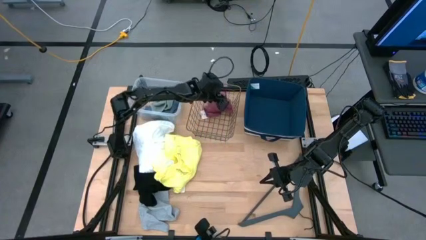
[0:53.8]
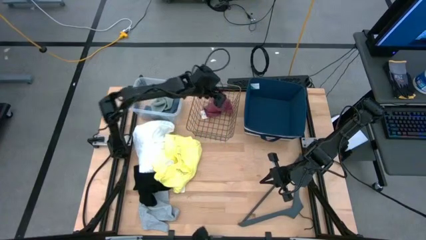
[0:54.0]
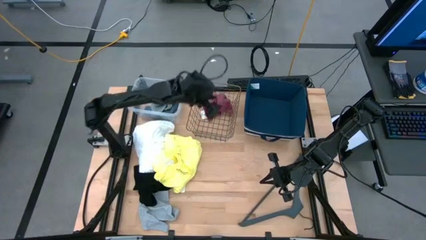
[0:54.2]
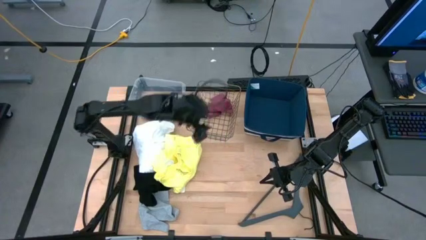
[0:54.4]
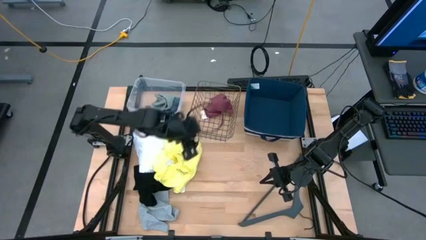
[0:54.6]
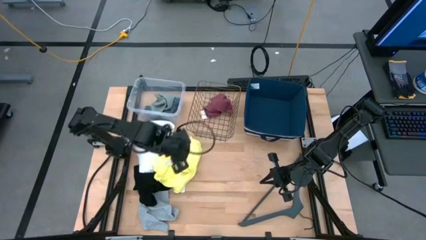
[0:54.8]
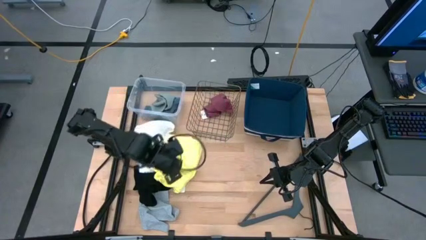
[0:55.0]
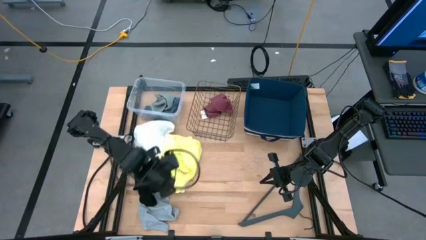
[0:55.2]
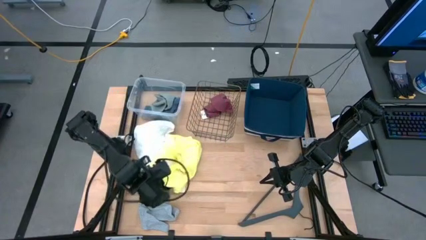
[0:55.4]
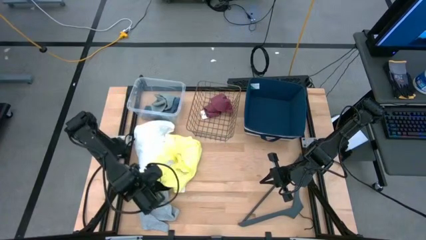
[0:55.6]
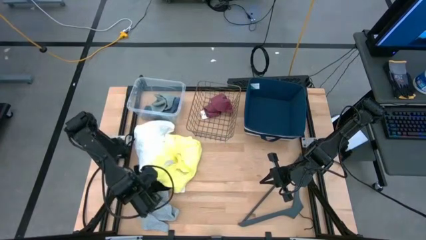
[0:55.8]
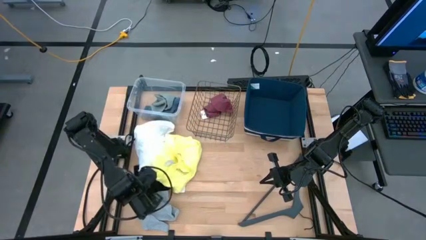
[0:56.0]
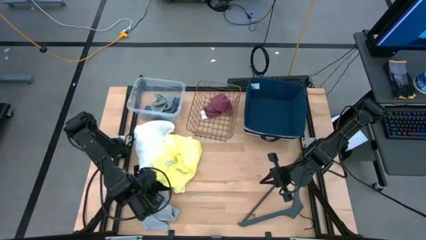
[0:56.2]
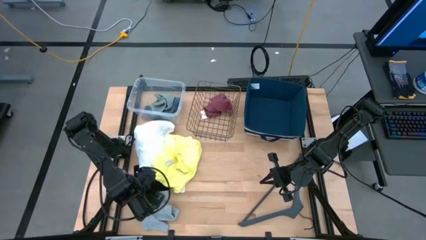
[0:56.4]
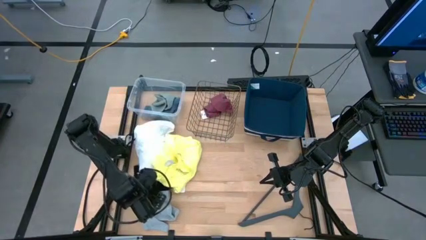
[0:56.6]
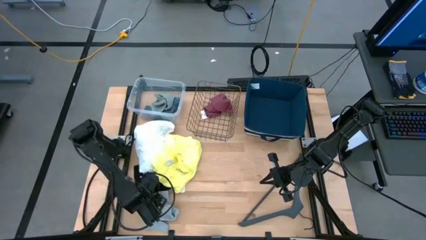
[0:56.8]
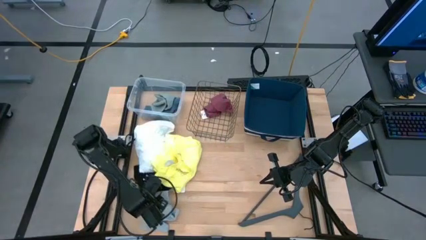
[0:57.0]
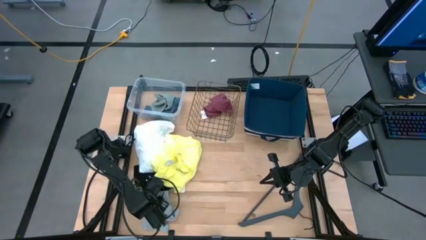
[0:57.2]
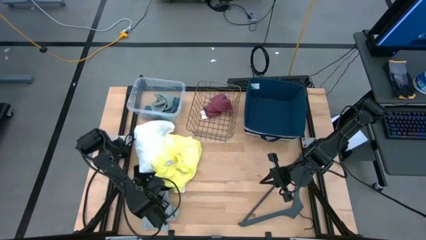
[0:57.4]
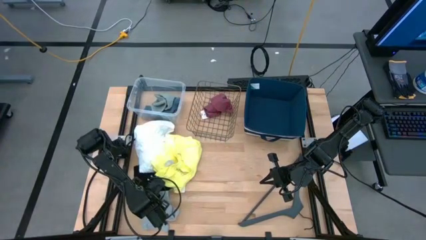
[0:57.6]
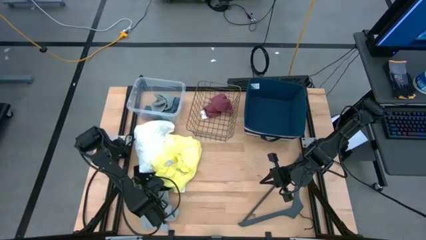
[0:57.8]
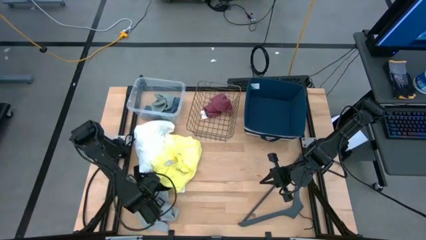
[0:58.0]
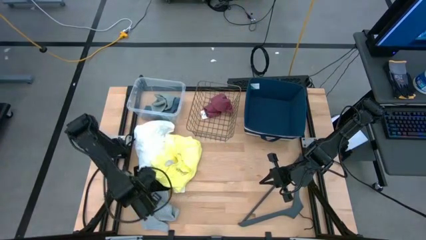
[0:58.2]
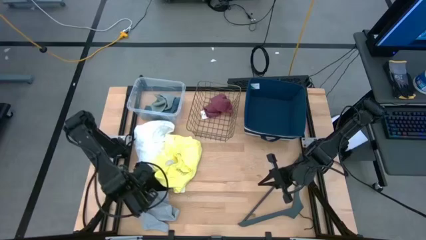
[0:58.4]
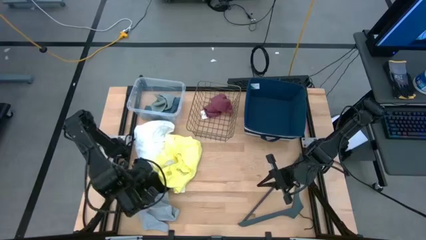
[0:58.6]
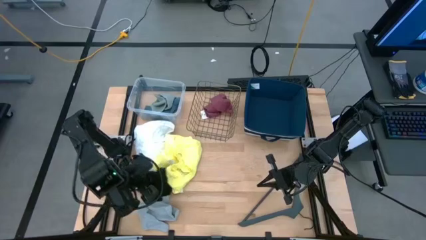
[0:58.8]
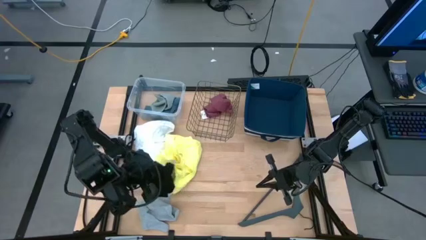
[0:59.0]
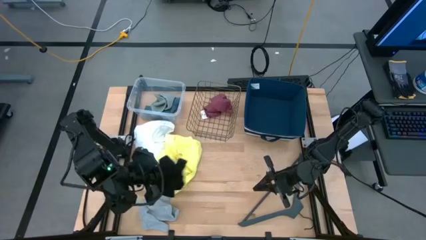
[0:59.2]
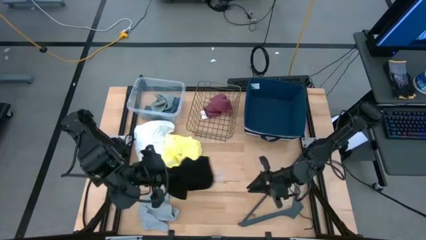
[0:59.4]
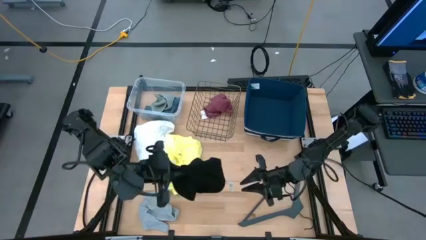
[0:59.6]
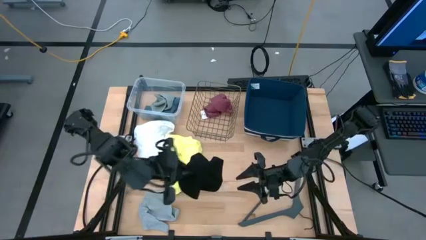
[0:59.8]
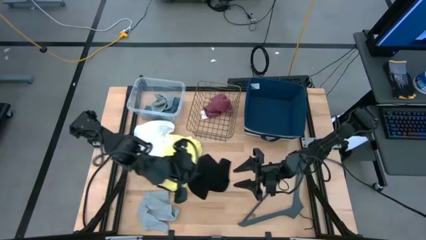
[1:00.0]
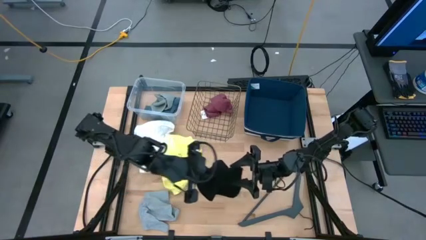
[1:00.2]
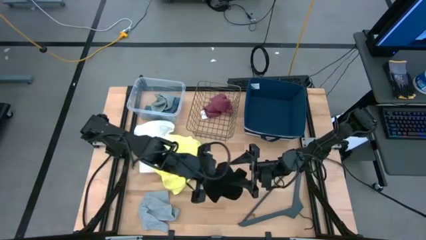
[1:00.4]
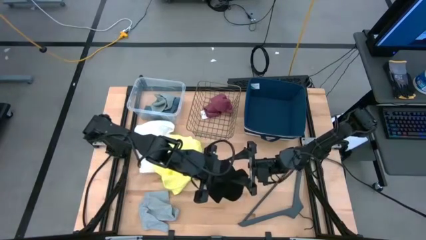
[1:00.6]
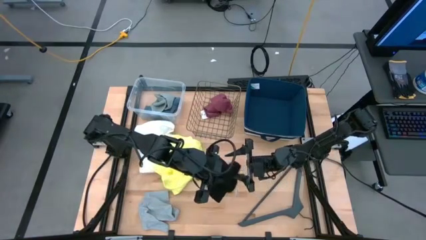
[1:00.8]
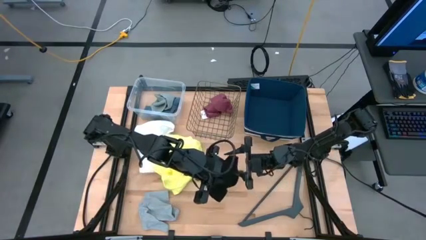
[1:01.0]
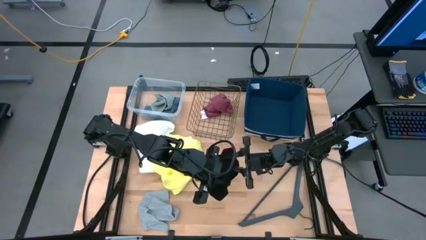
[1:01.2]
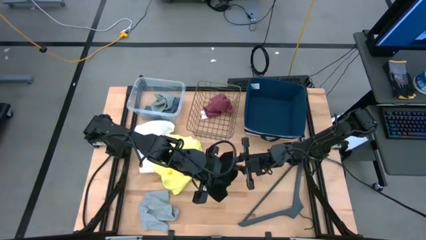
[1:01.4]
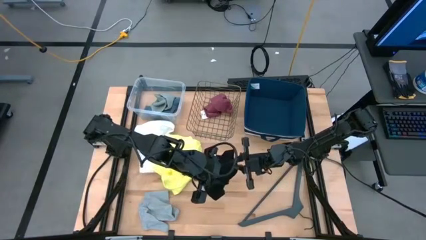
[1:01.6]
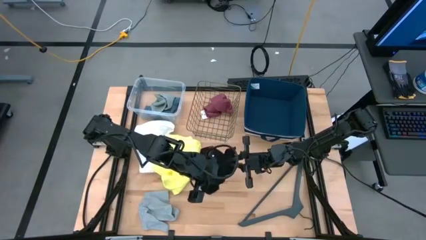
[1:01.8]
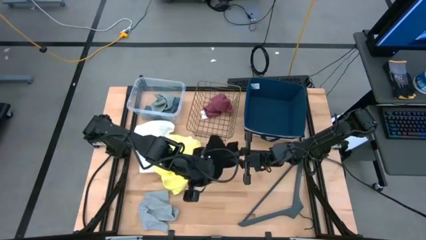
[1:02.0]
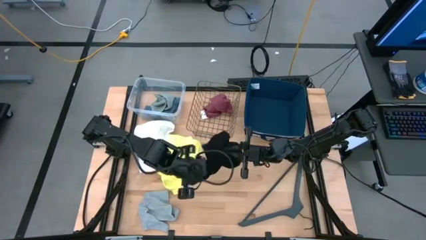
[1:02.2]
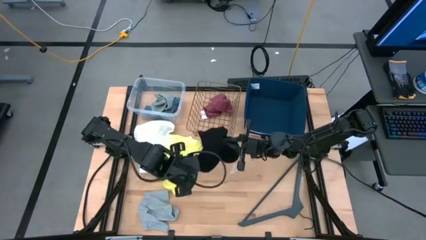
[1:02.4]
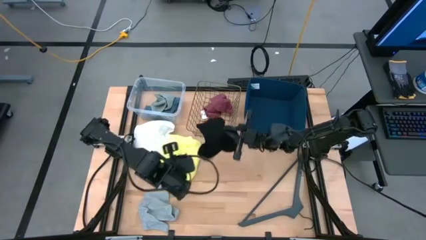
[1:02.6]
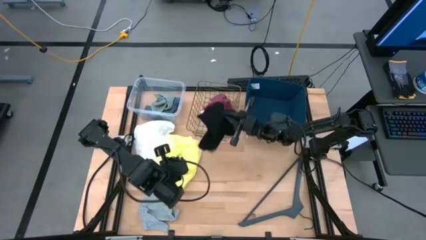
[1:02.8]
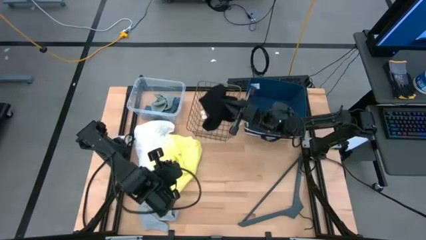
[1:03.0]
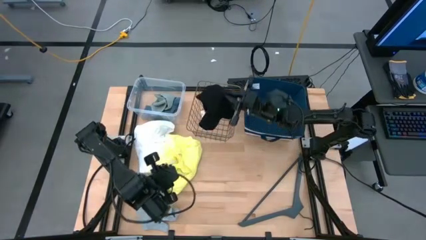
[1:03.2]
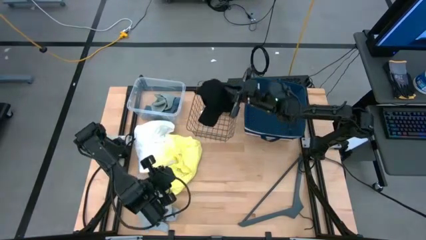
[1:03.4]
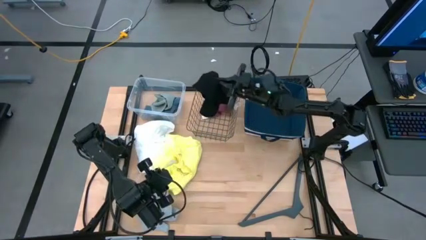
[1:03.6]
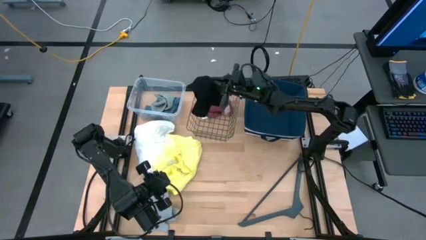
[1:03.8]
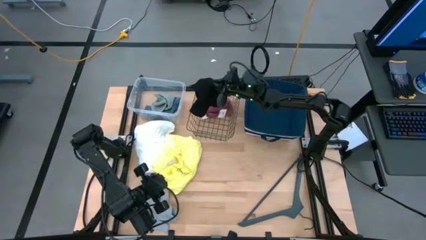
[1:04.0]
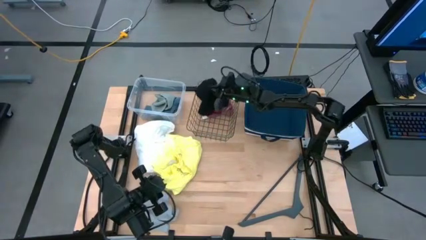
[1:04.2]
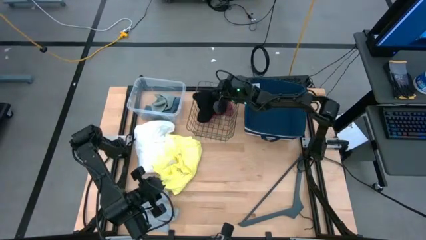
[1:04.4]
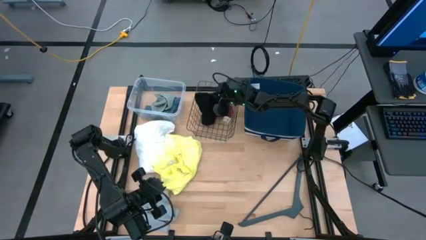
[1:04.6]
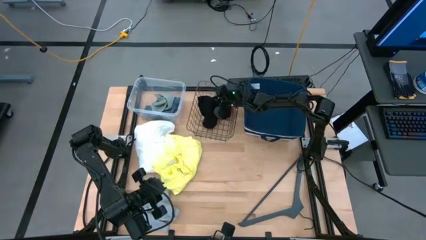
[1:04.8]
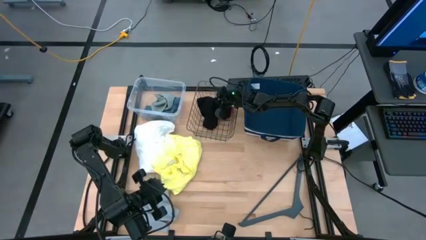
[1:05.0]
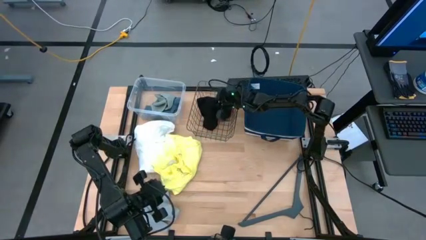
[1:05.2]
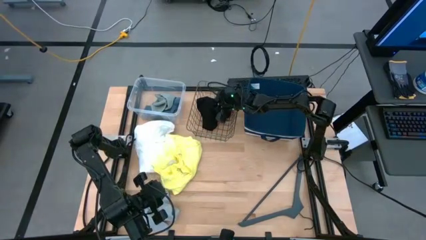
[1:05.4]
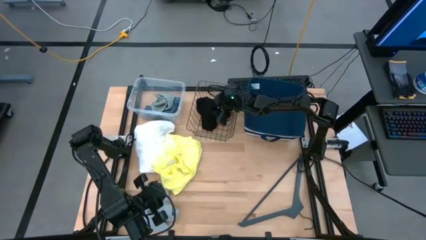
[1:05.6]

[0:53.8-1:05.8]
Task: Pick & Place Cloths
Put the black boxer into the gold wire basket

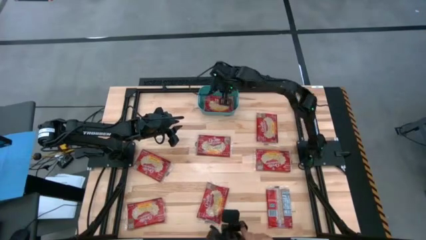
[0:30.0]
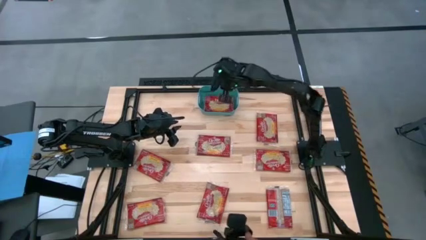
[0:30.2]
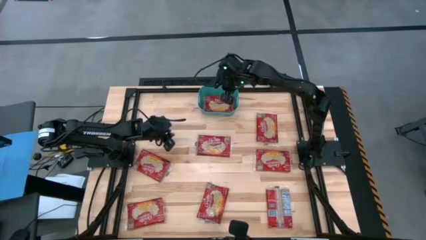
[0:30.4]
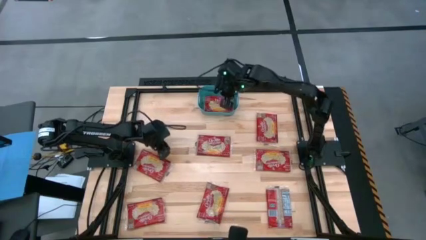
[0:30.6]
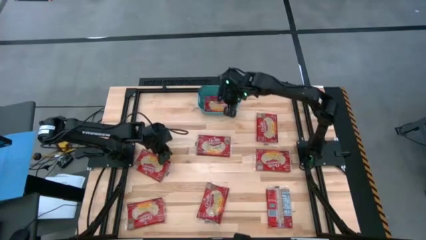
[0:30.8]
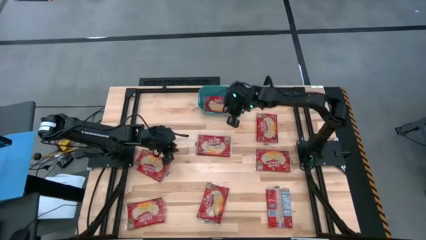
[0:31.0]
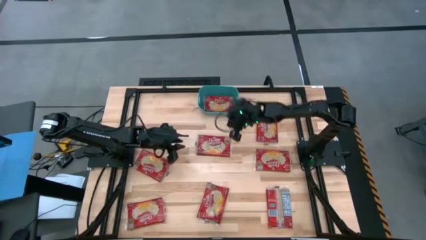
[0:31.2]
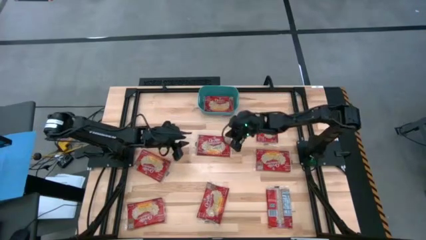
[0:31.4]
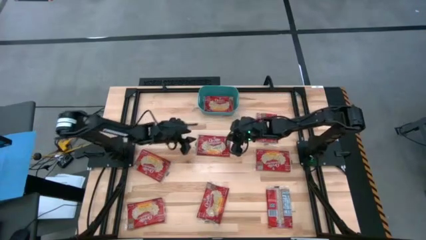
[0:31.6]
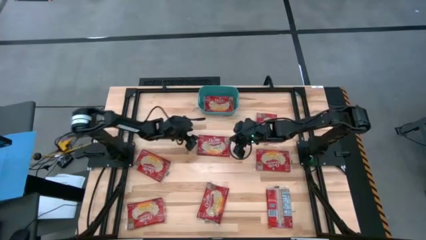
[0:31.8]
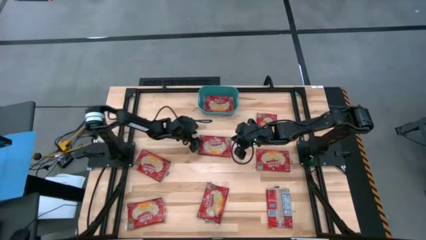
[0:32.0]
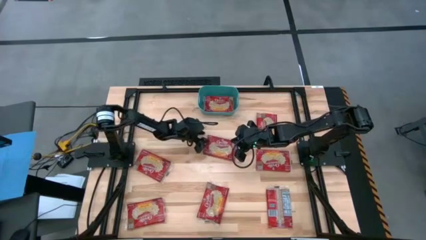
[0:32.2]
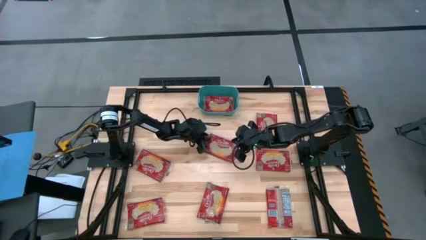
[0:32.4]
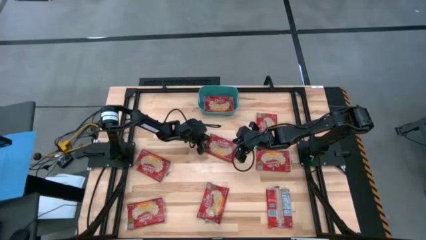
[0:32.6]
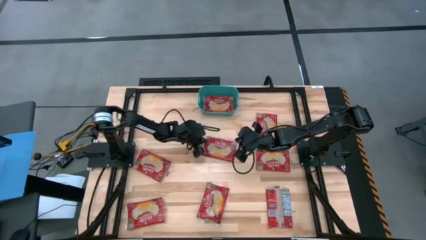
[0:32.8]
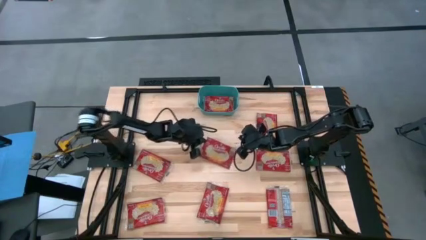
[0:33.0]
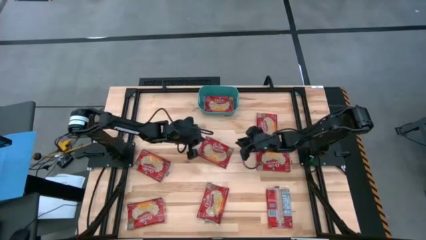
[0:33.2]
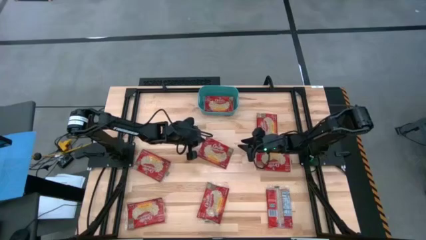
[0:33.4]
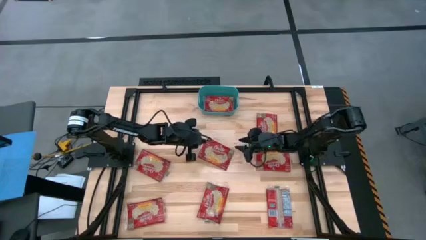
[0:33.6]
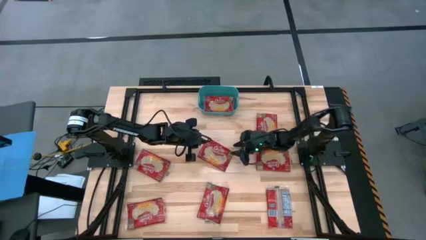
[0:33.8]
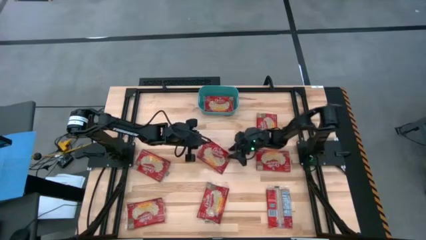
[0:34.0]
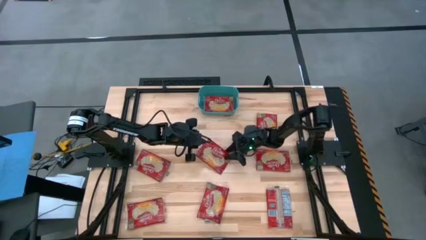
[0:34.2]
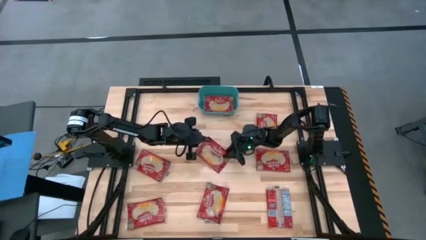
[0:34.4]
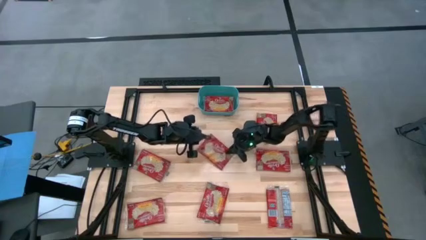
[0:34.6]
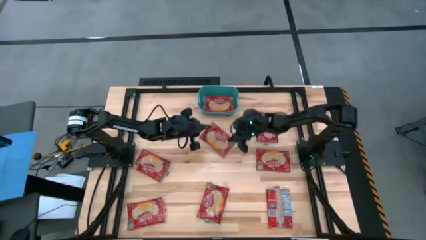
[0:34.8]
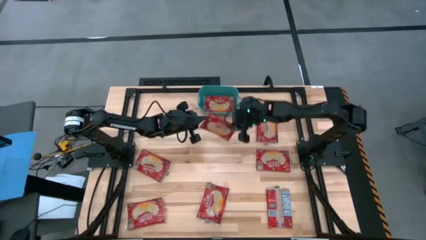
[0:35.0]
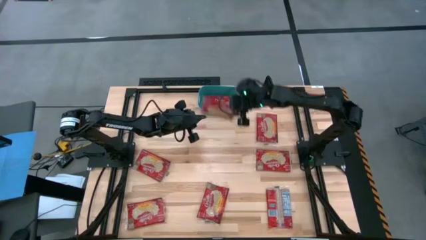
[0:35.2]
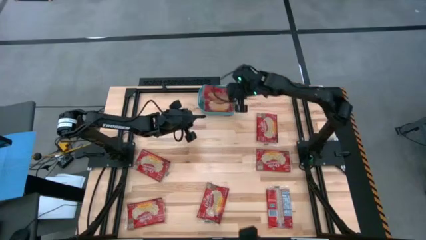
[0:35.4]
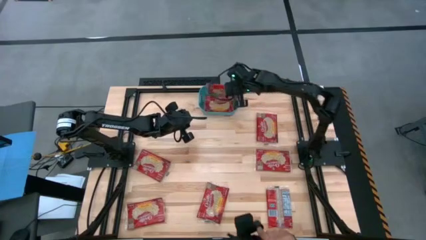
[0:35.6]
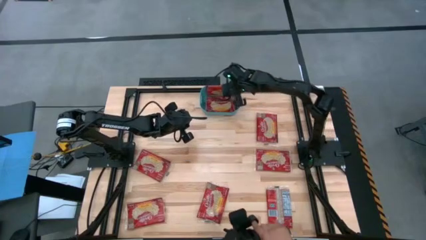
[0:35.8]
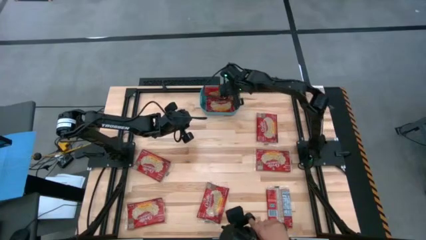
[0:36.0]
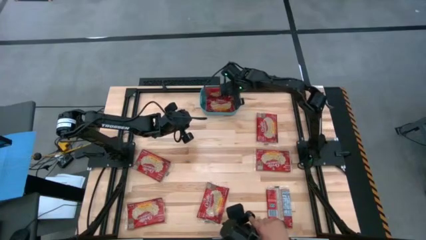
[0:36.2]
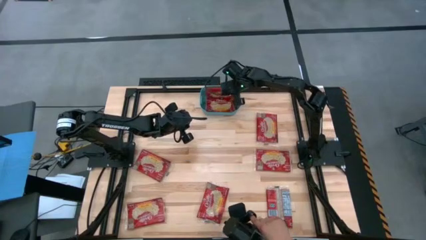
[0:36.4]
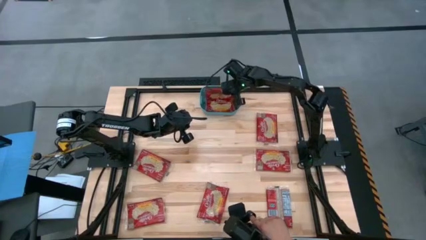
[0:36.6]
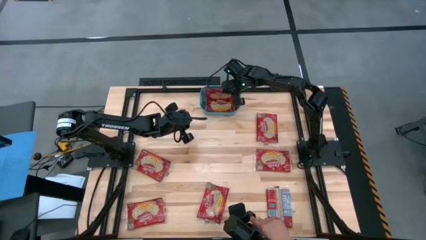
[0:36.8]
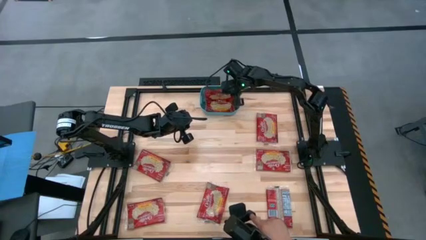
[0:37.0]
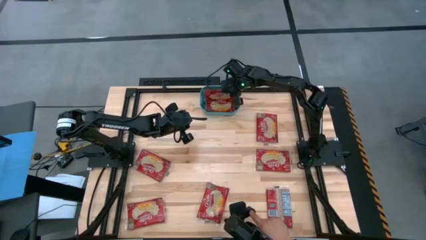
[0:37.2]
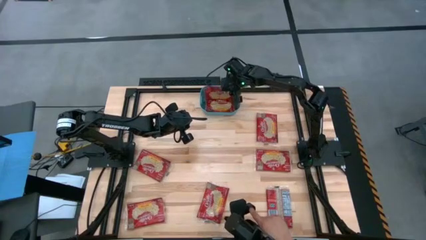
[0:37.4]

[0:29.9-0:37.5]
Task: Sort popcorn bags into baskets
Put the red popcorn bag into the blue bin
